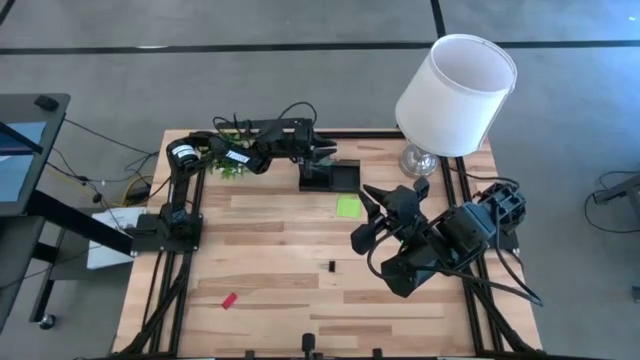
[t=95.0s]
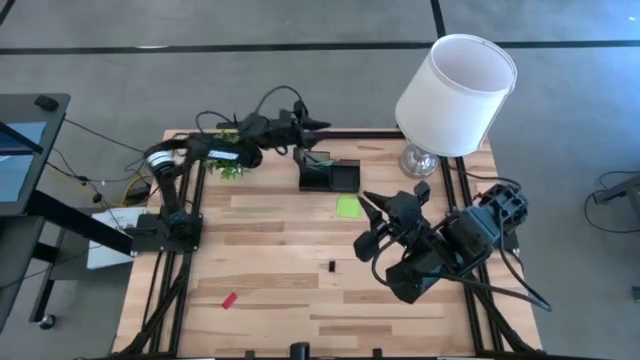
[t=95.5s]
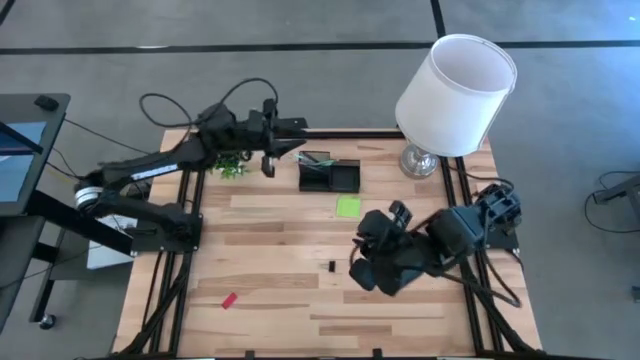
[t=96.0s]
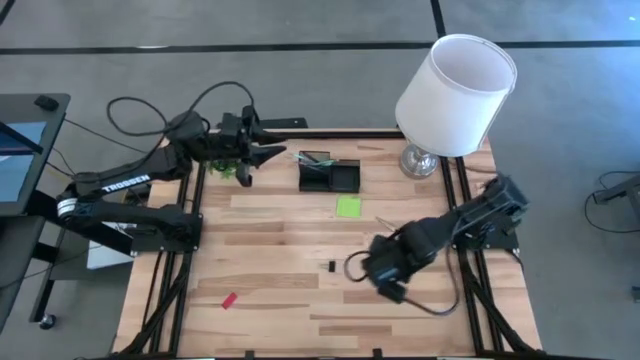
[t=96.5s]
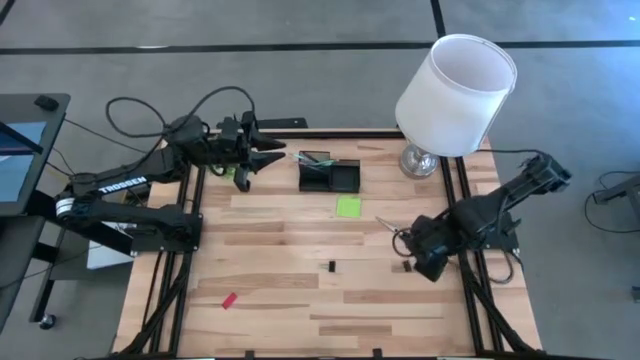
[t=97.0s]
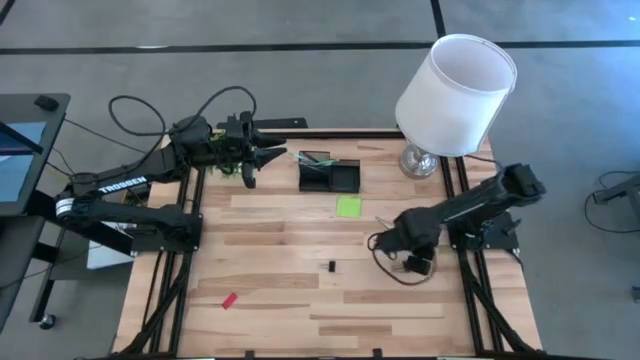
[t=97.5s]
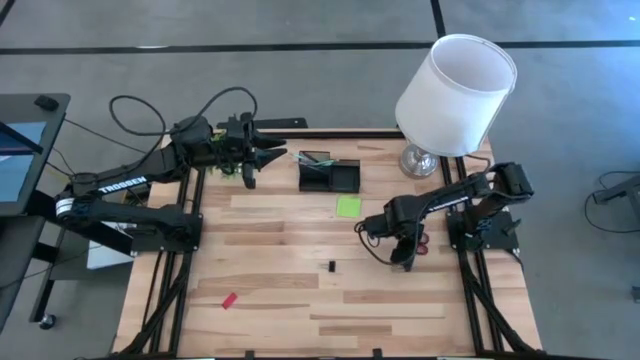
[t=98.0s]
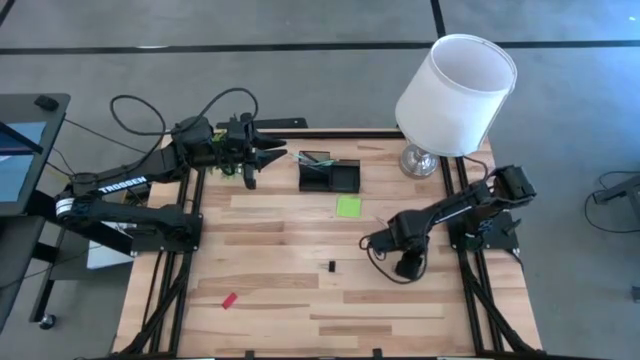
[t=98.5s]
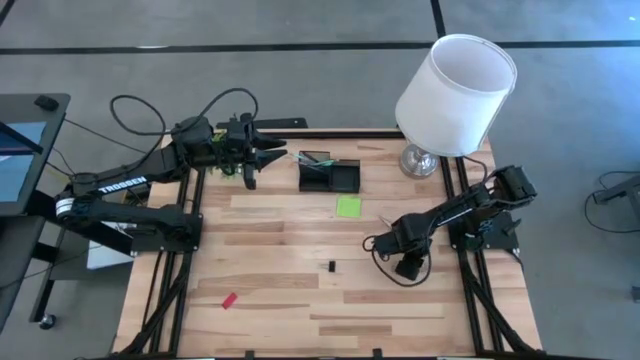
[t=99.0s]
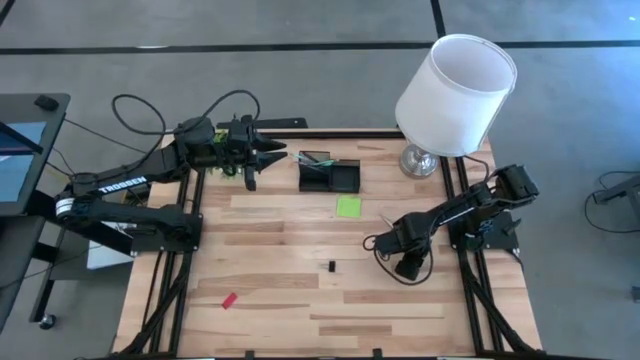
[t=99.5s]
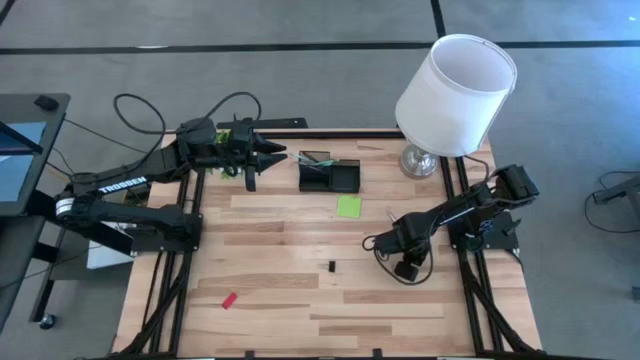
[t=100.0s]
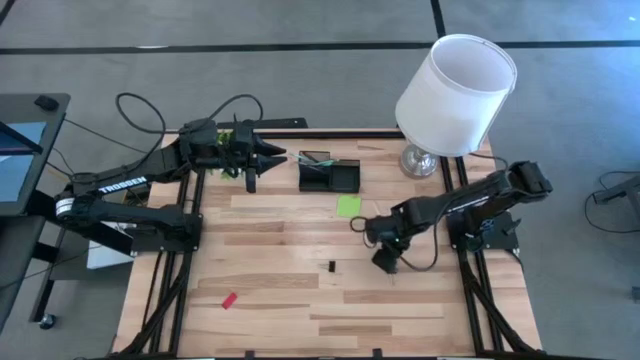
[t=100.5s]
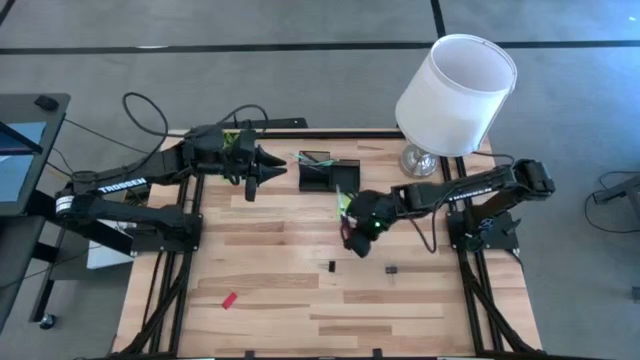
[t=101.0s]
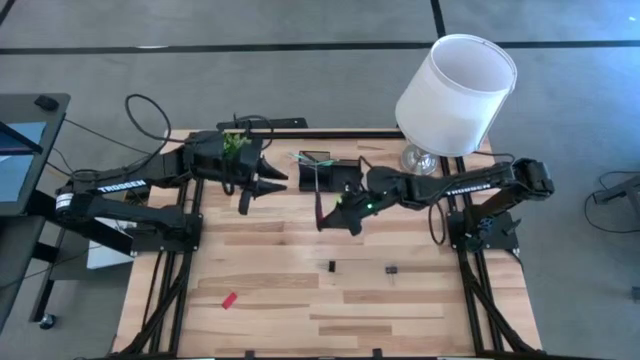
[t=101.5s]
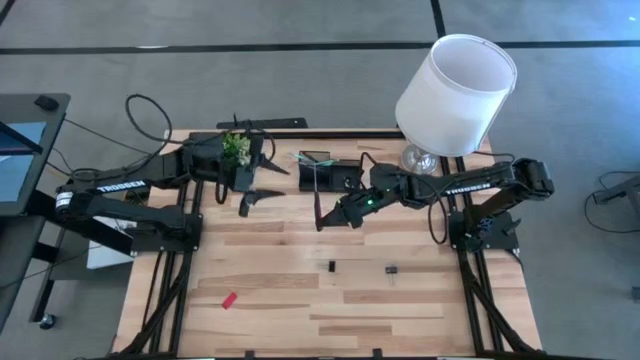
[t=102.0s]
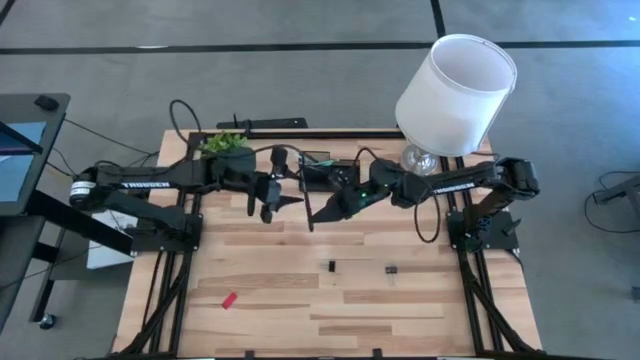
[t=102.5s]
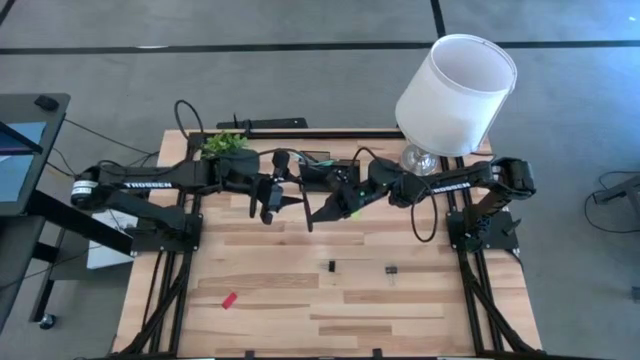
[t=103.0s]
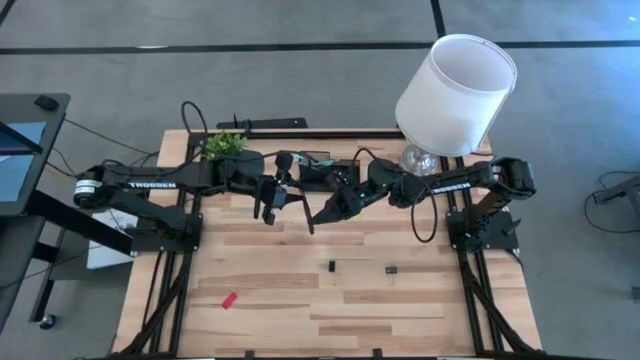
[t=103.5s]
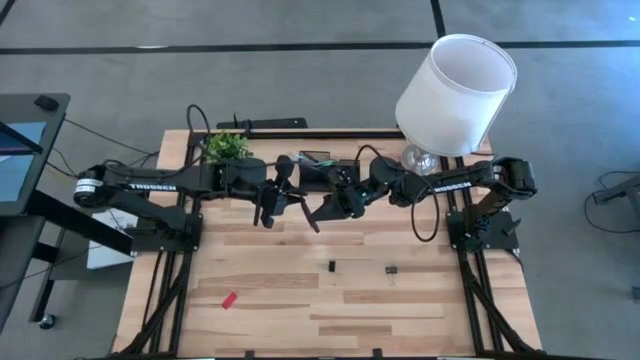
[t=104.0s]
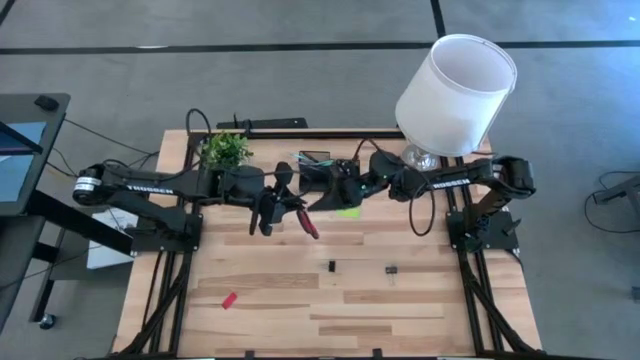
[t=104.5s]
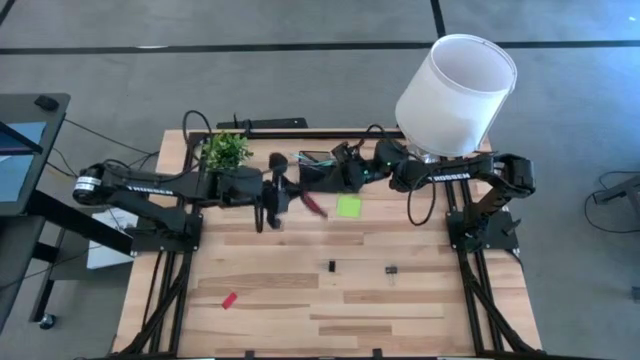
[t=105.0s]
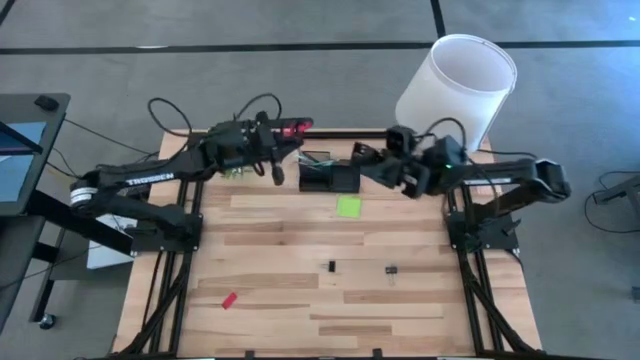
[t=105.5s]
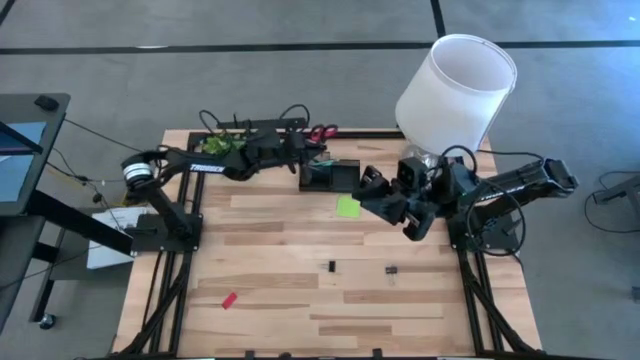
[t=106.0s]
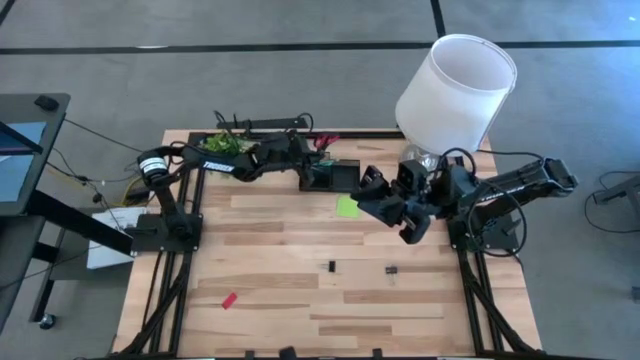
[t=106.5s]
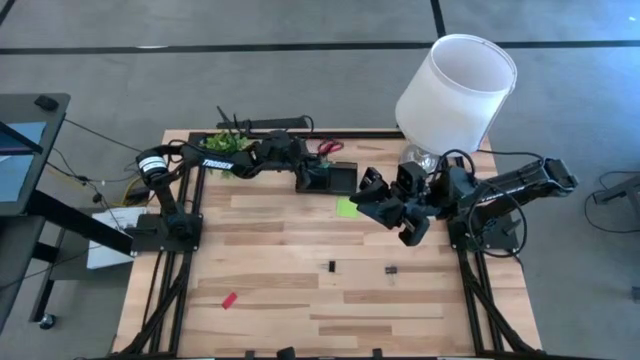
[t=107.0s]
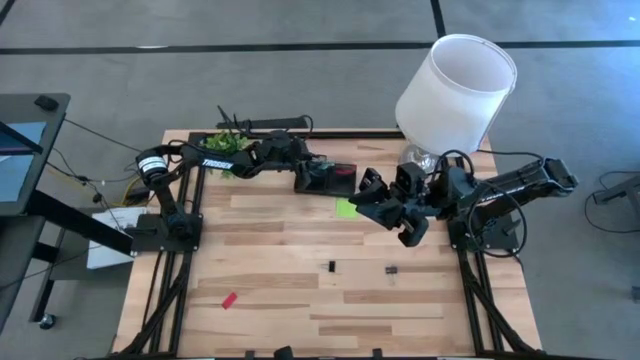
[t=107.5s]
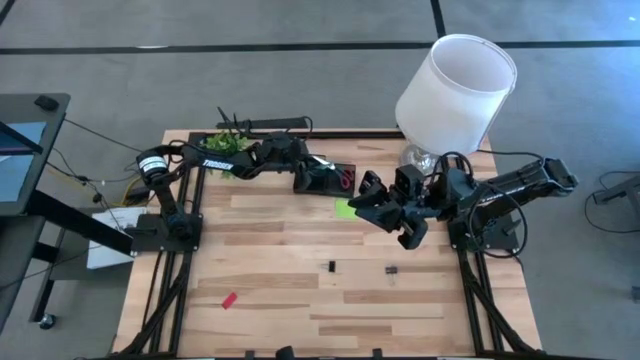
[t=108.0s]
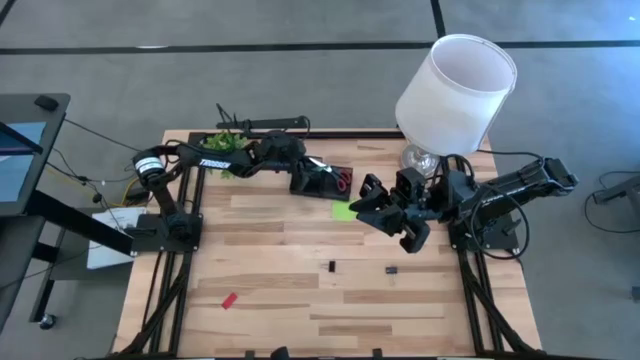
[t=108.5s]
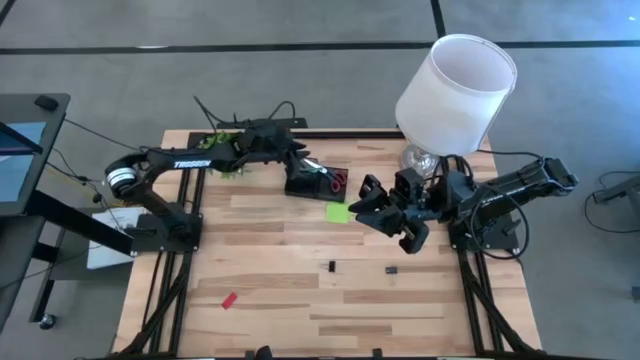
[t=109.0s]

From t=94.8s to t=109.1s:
Task: Pick and place office supplies into organizer
Put the black scissor into the black desk organizer

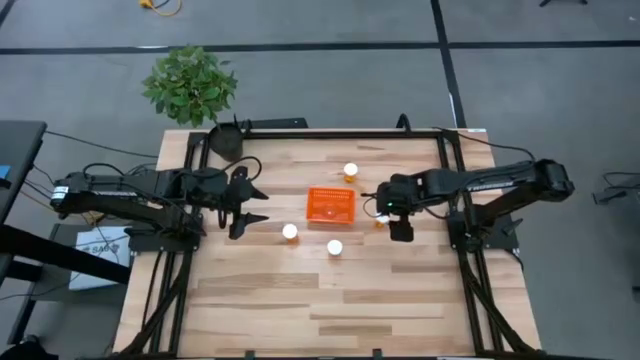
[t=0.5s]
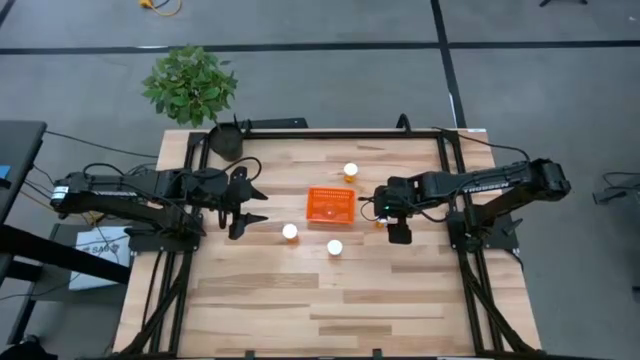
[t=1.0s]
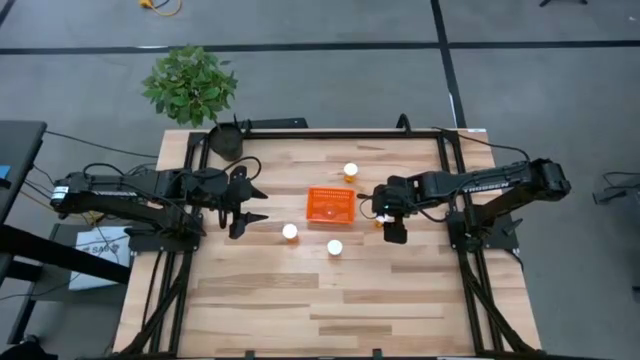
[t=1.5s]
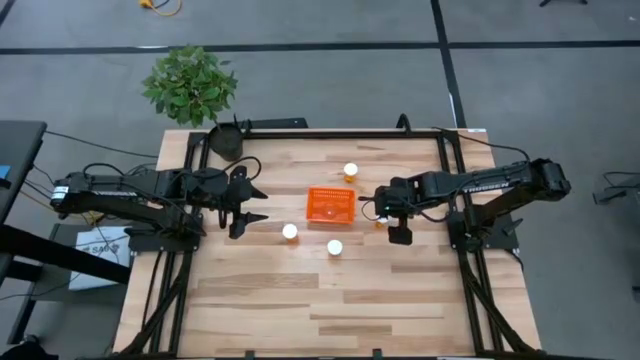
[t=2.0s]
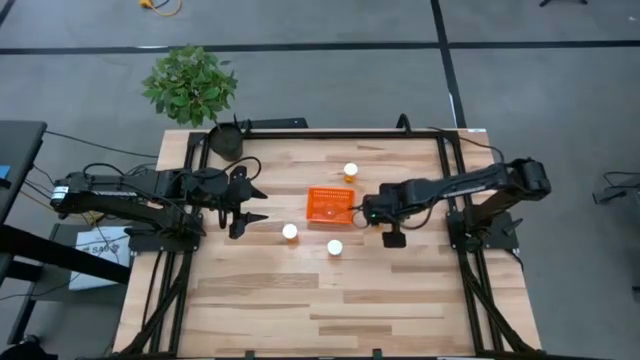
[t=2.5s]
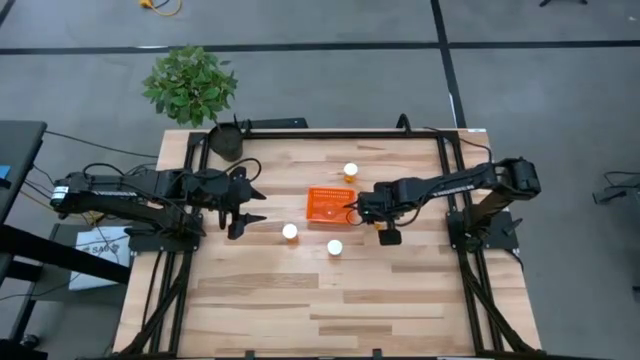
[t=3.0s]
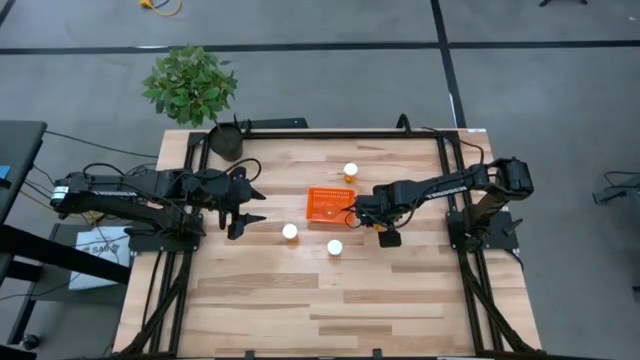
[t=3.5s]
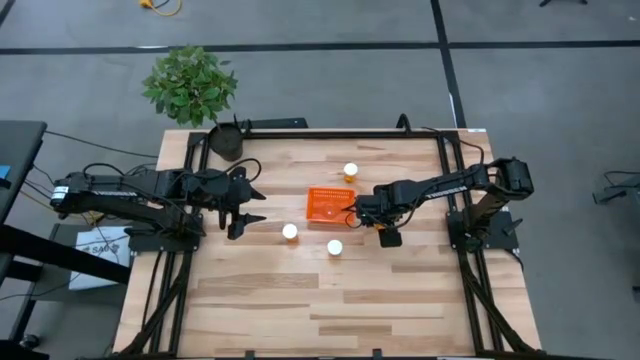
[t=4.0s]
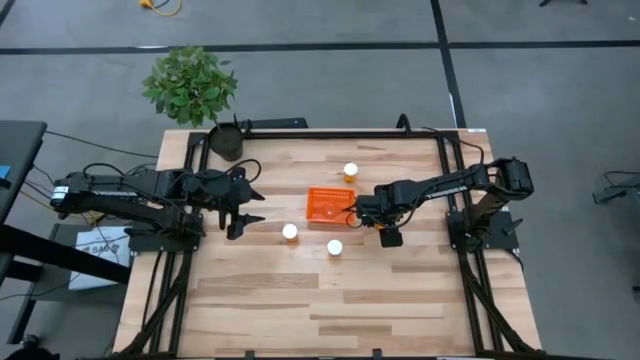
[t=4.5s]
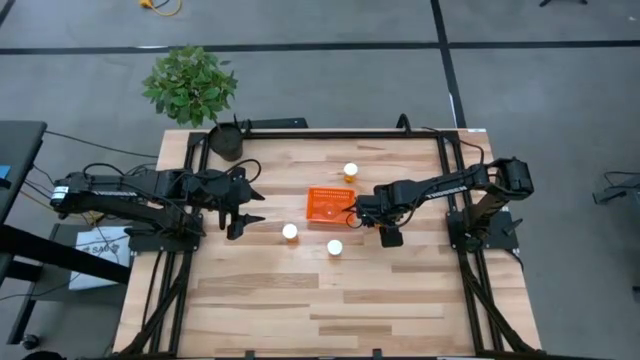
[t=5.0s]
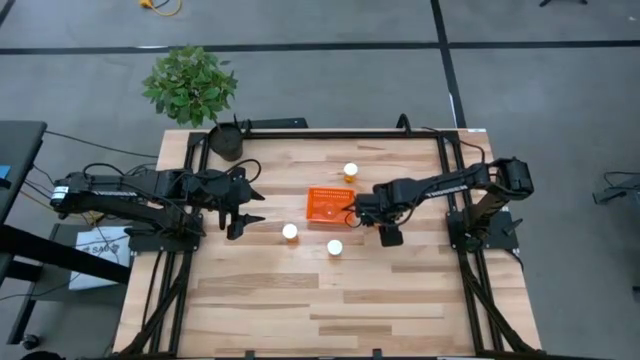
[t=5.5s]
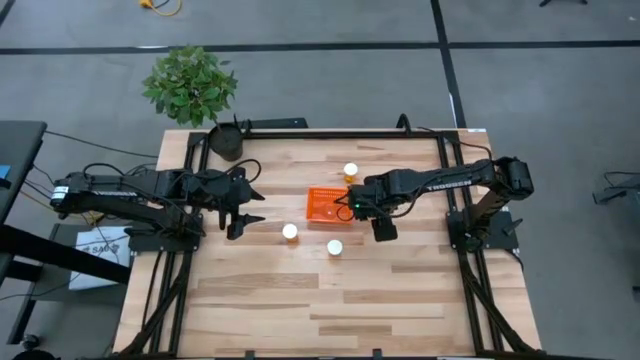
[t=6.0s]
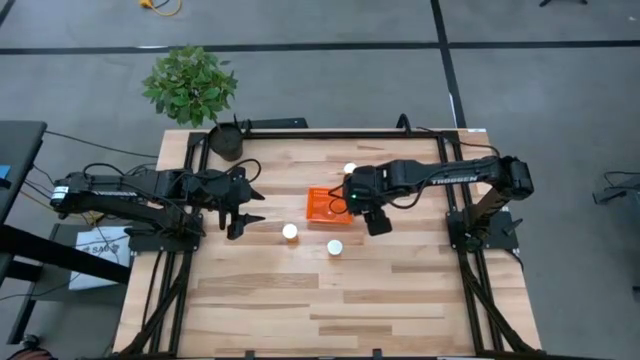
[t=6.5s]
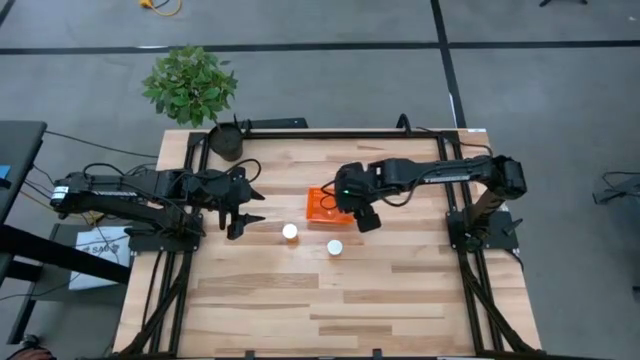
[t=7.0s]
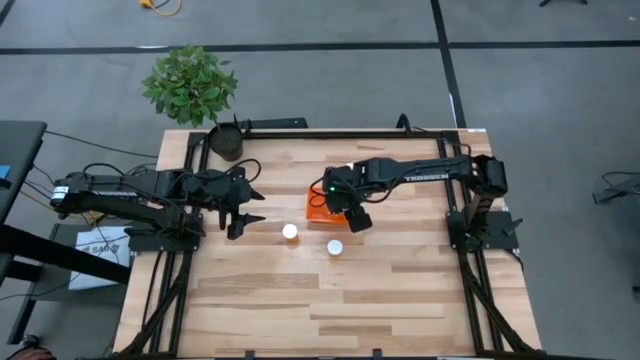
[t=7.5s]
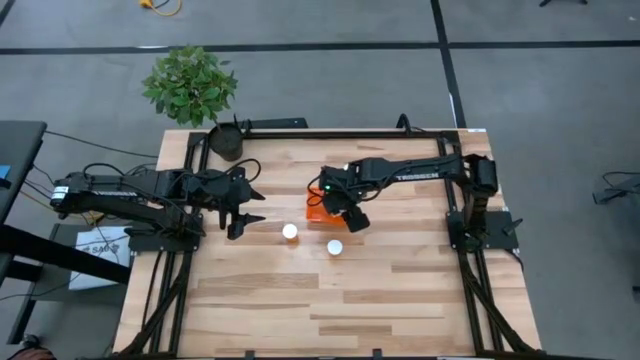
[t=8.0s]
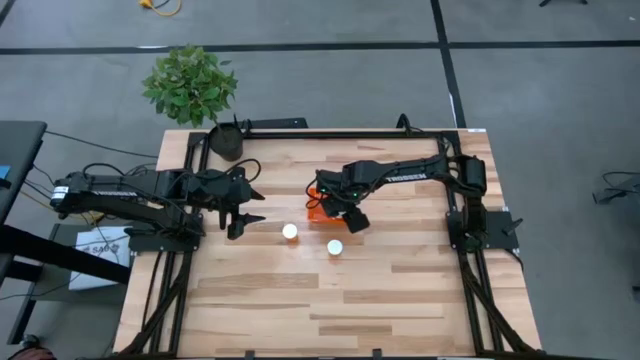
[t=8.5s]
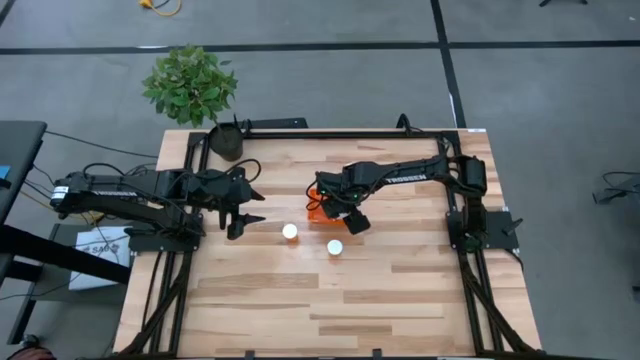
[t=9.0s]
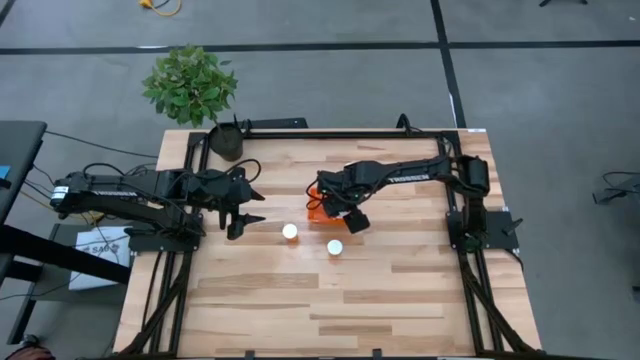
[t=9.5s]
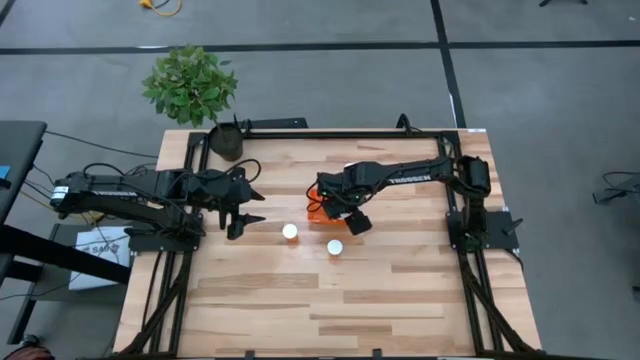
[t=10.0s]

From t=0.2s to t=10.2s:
Task: Pick and place pill bottles into a basket
Put the orange pill bottle into the orange basket
